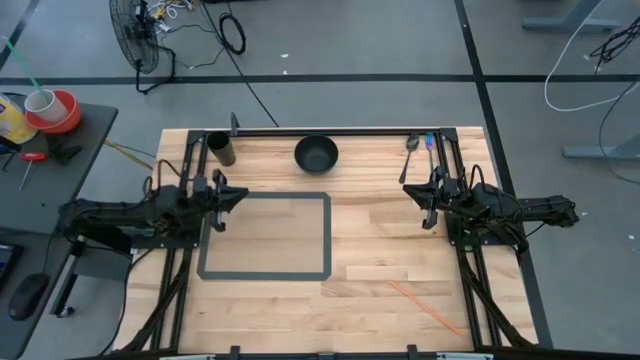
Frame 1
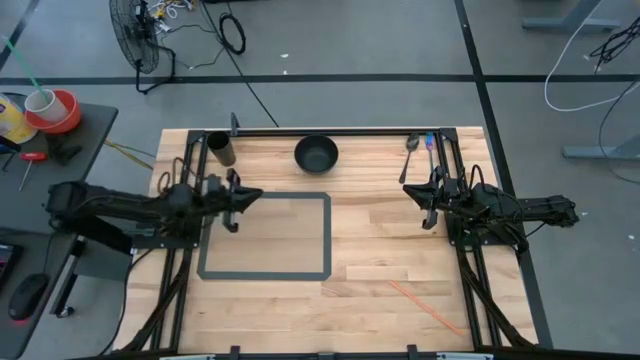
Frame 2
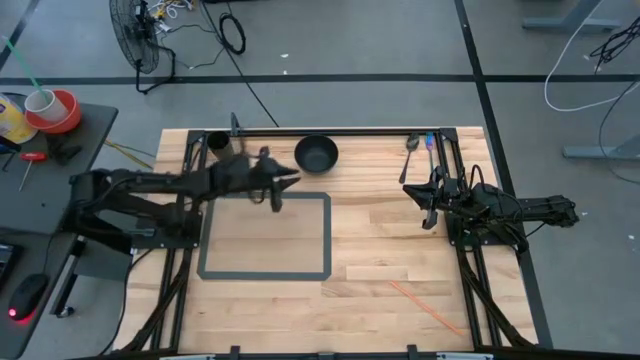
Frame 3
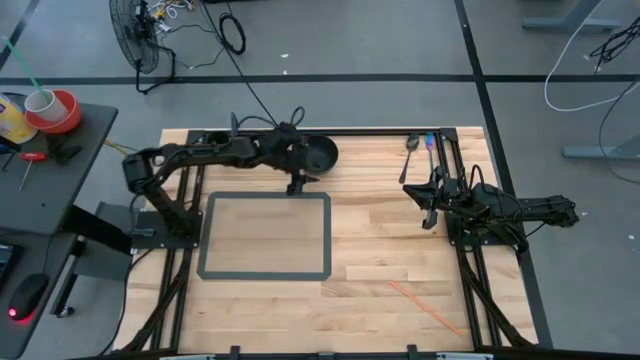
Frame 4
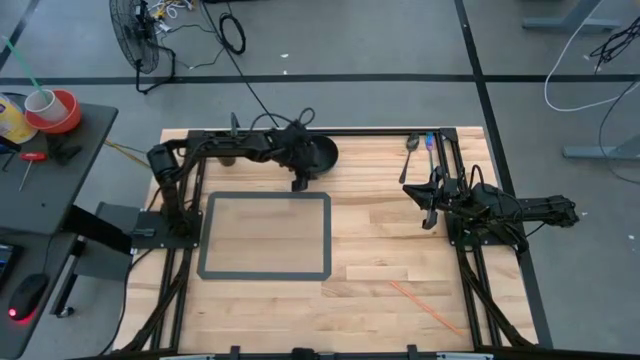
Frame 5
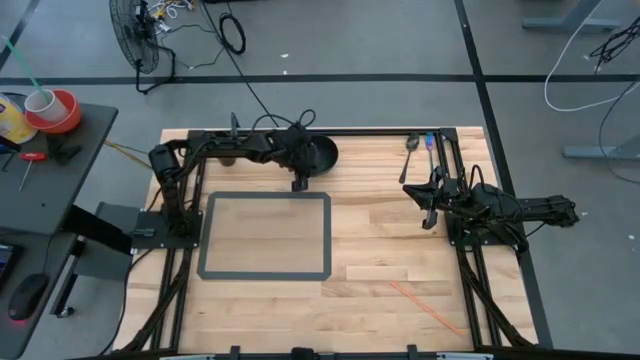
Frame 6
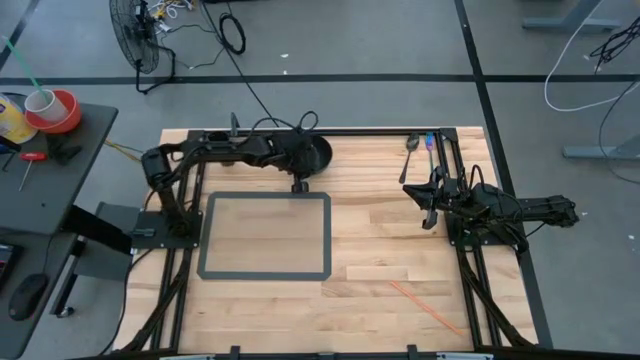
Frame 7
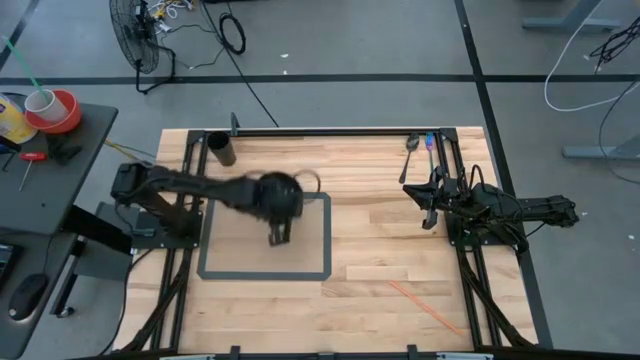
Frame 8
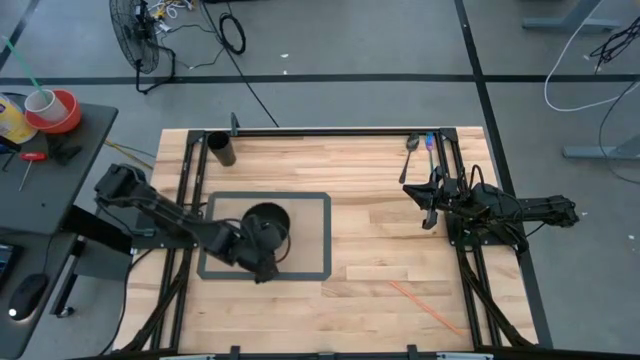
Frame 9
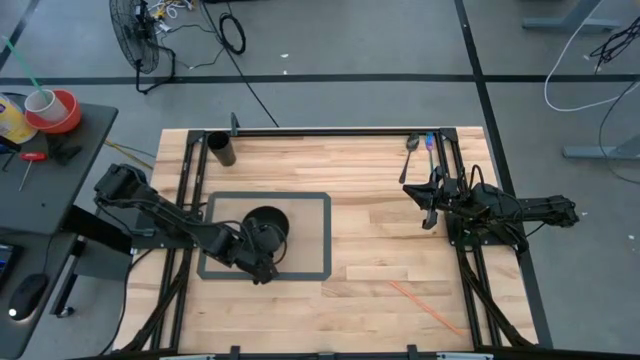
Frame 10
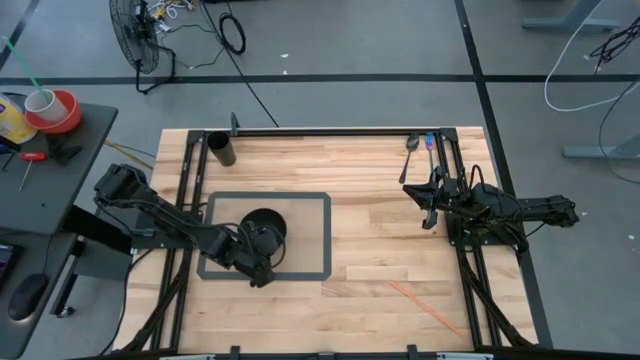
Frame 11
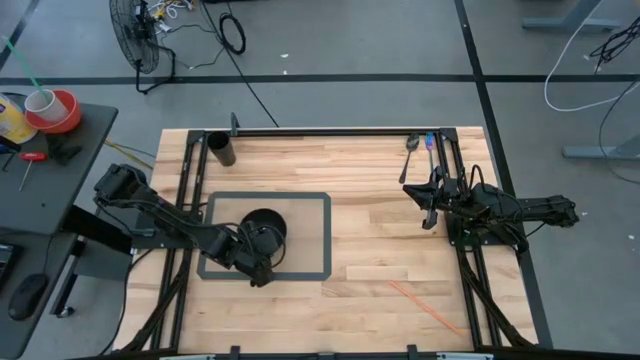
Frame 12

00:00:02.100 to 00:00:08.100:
Task: Pick & Place Utensil
Put the black bowl on the center of the transparent mat

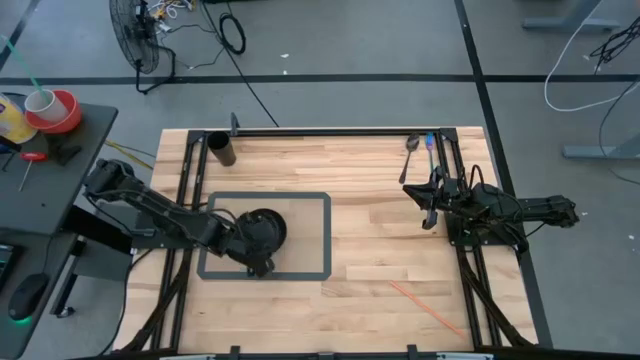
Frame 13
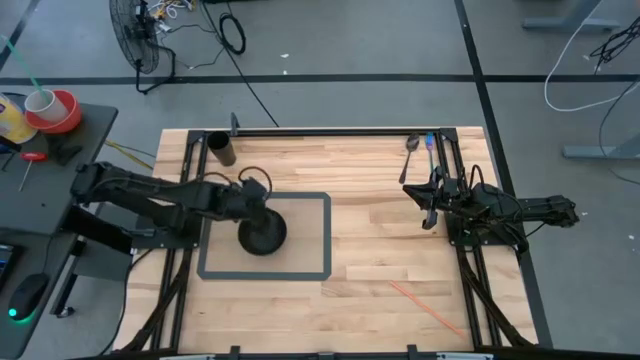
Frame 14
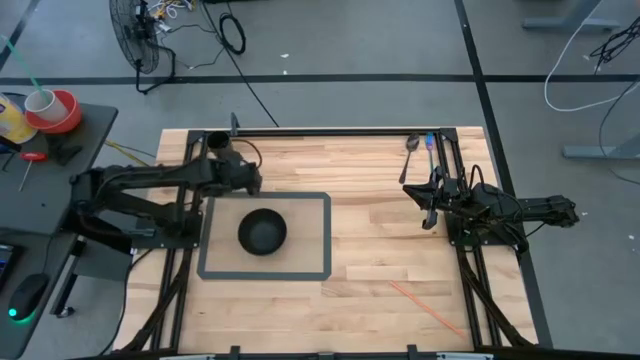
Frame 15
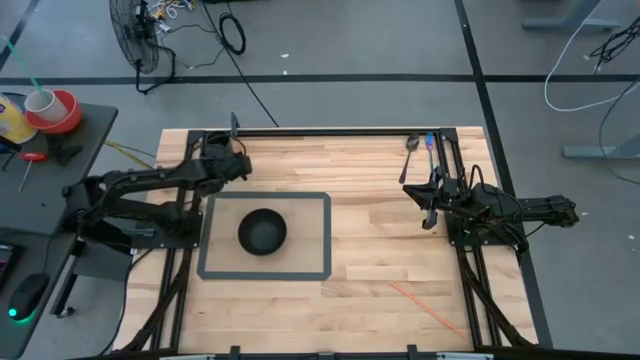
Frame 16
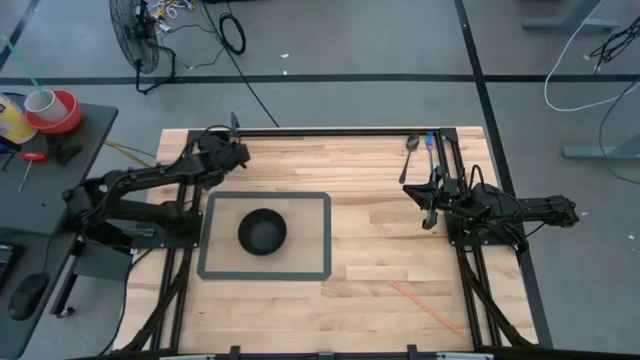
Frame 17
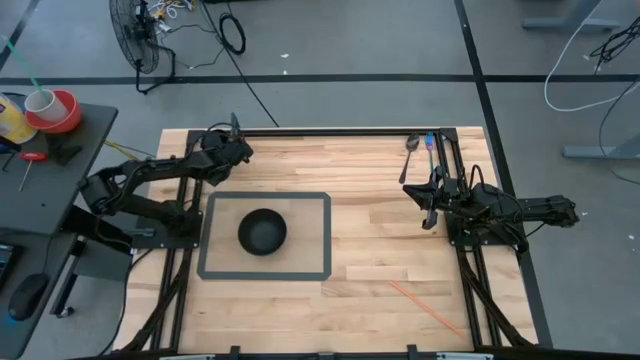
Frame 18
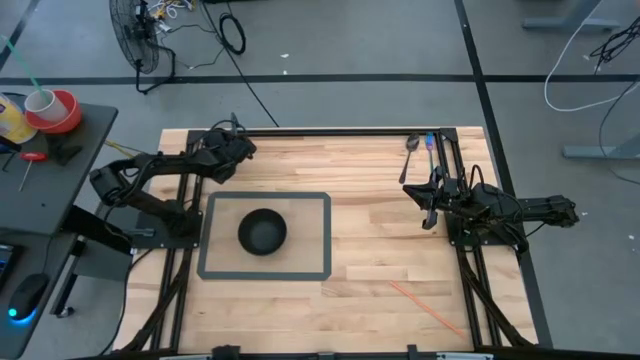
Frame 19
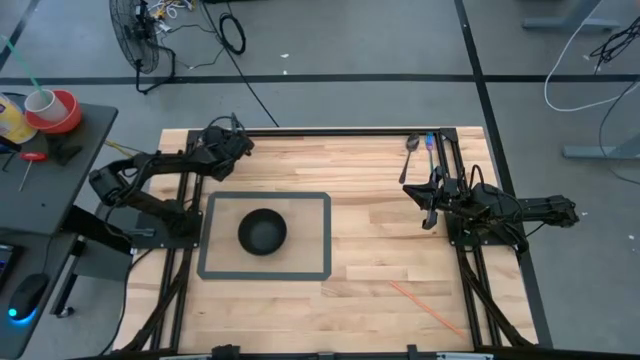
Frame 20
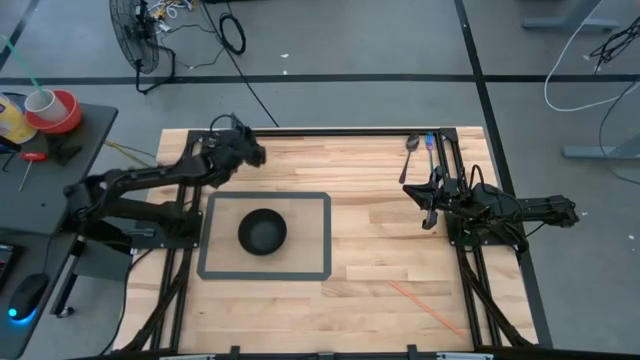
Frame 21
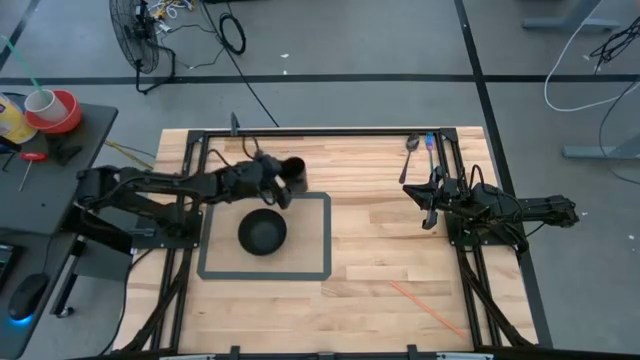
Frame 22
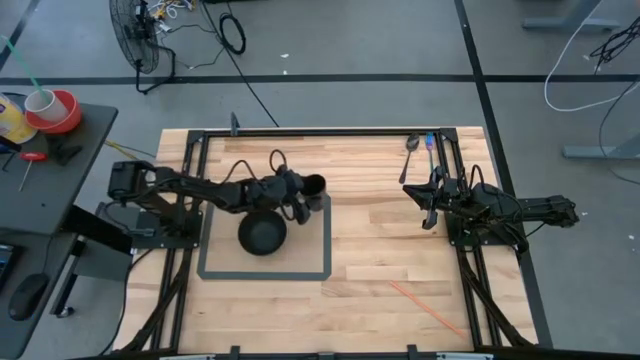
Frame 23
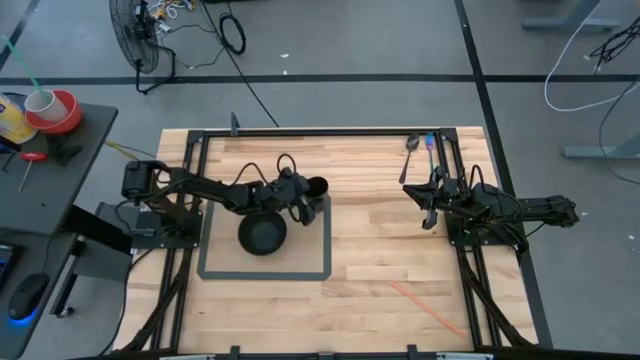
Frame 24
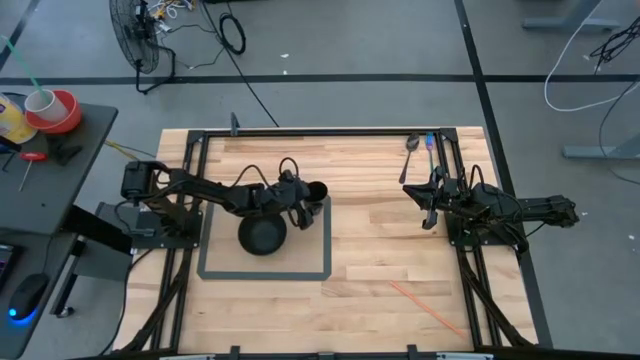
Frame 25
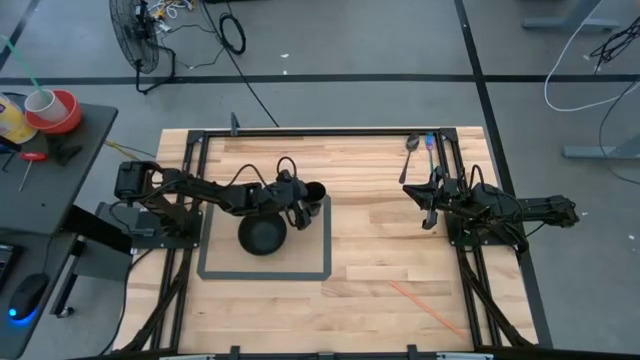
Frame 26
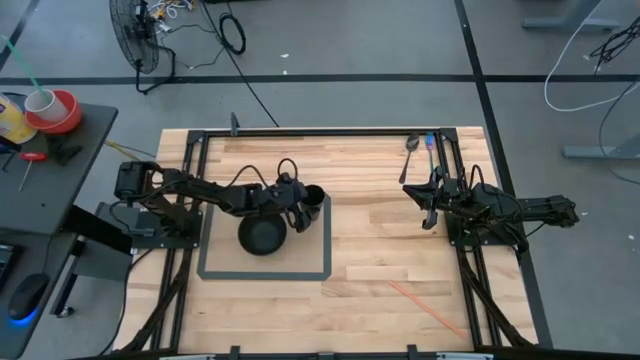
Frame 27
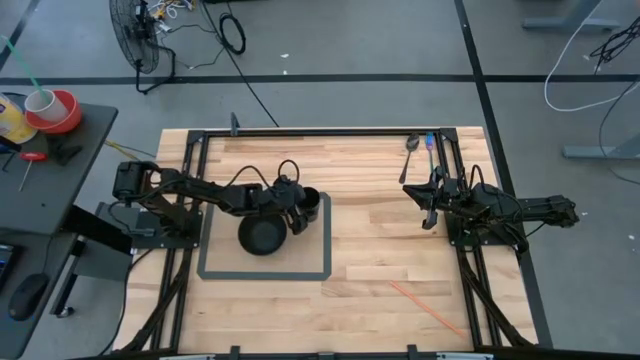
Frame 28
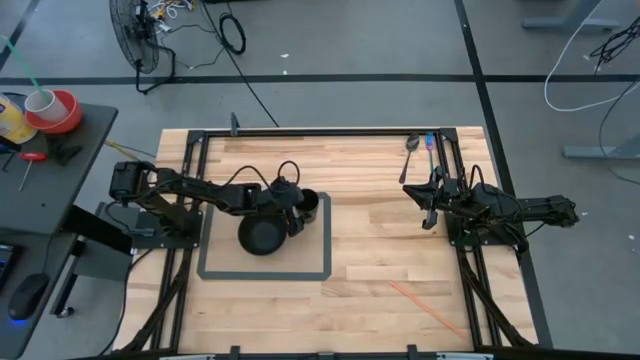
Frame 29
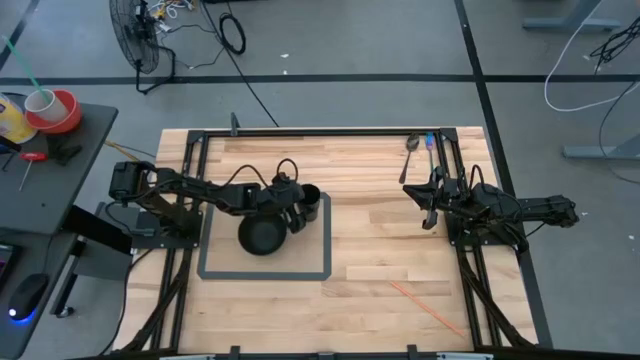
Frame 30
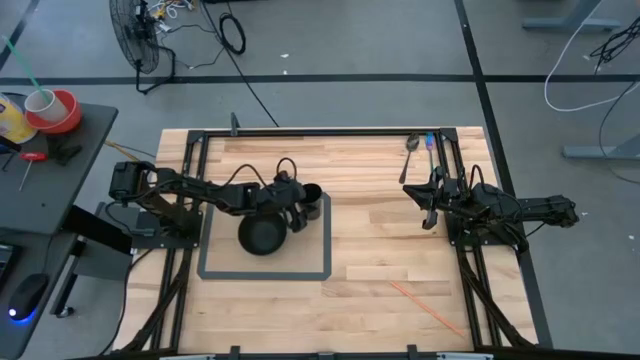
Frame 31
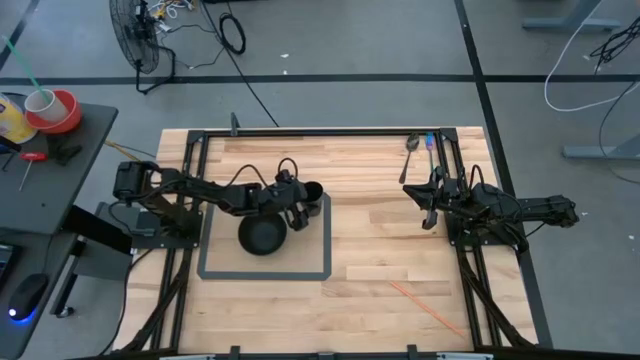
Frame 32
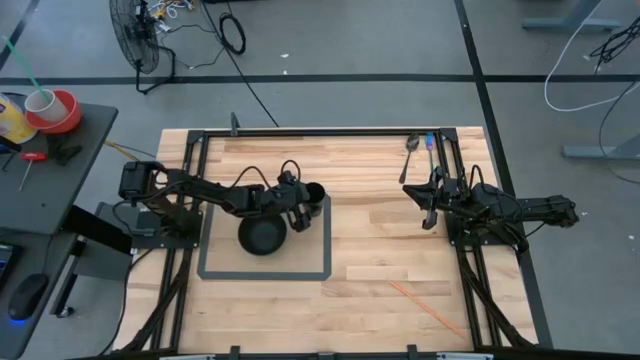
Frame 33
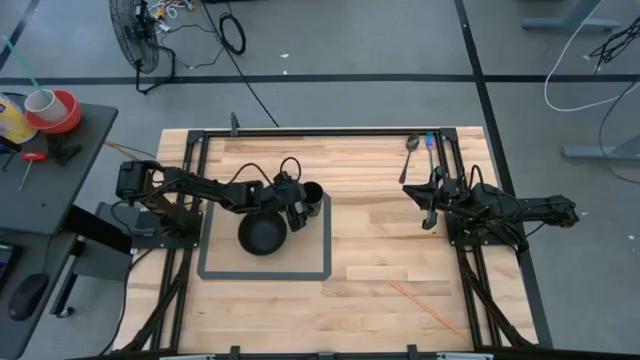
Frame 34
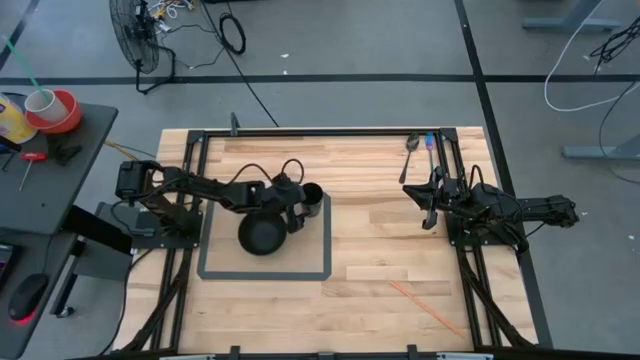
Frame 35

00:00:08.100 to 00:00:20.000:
Put the black cup on the top right of the transparent mat

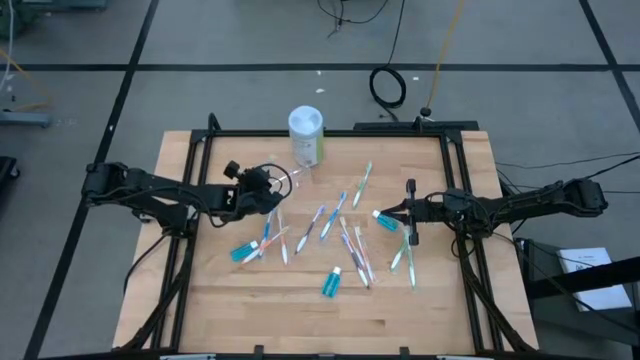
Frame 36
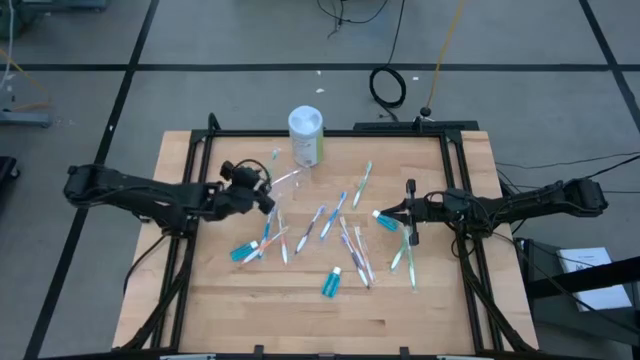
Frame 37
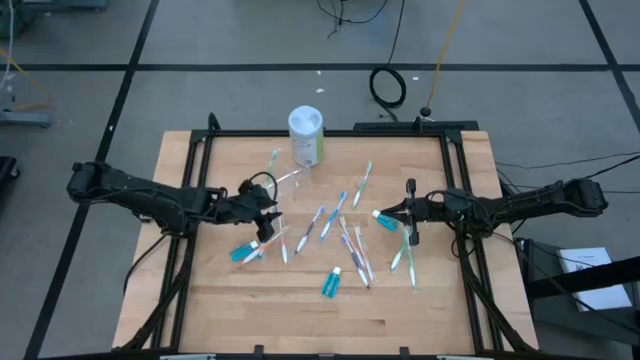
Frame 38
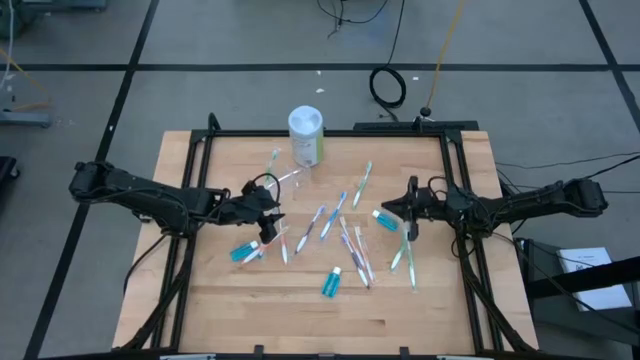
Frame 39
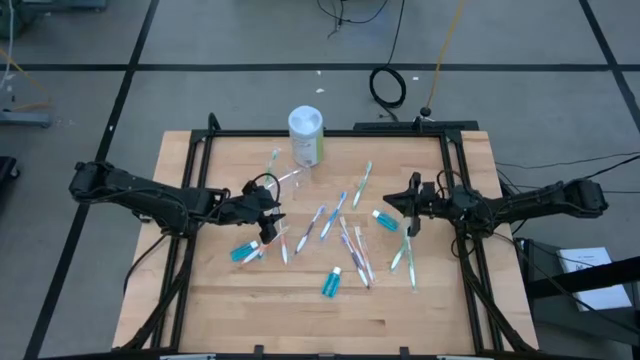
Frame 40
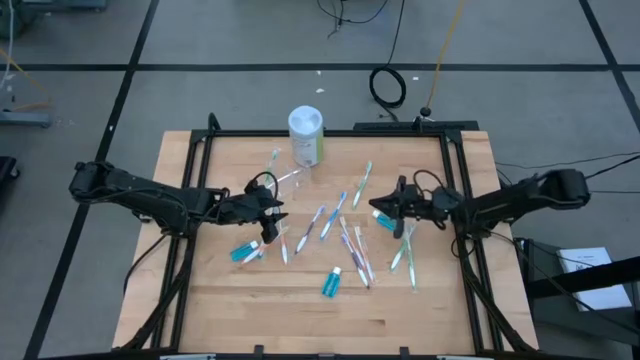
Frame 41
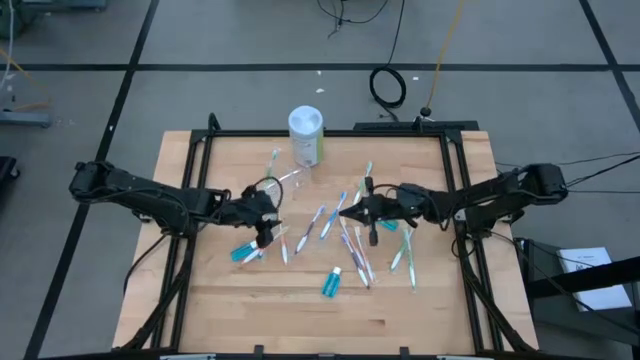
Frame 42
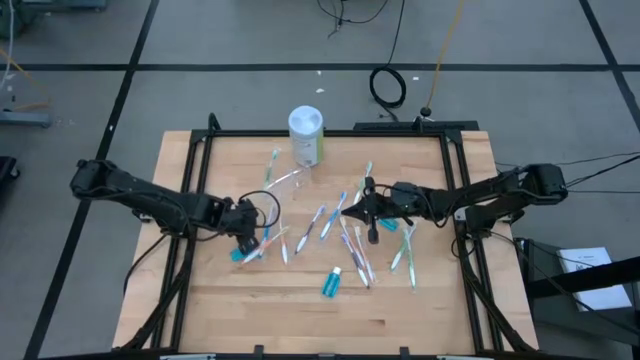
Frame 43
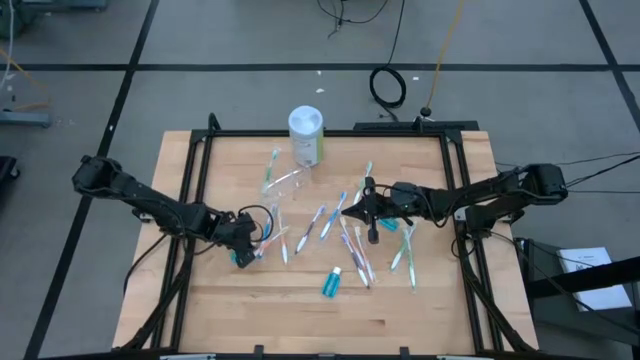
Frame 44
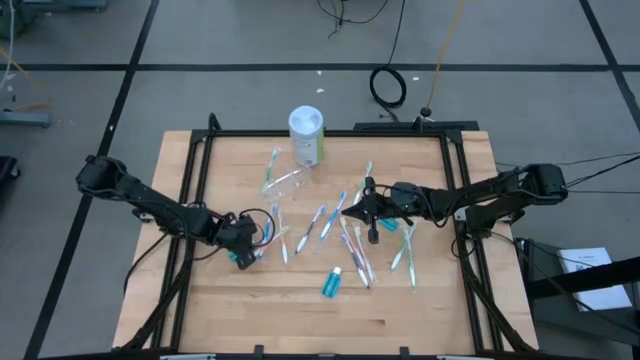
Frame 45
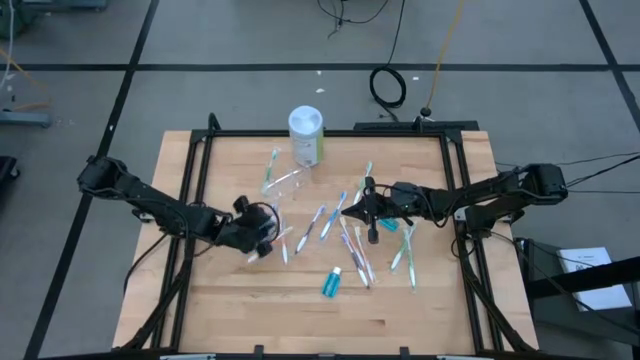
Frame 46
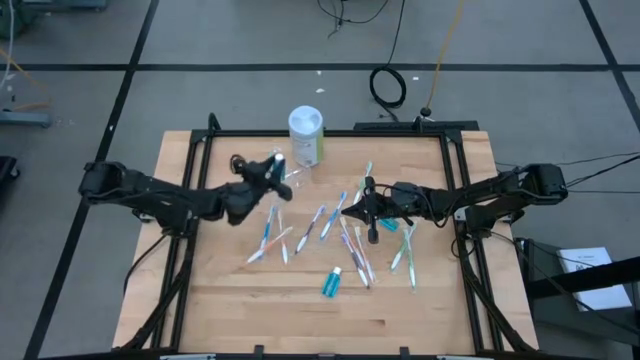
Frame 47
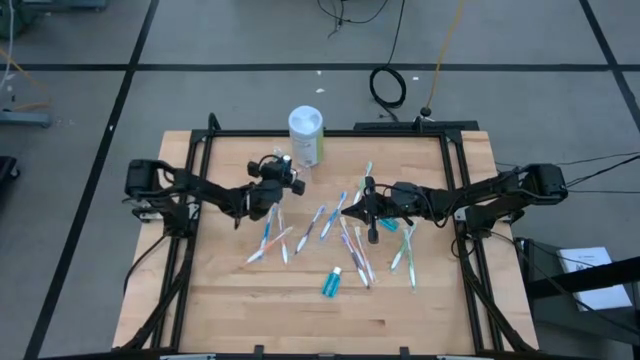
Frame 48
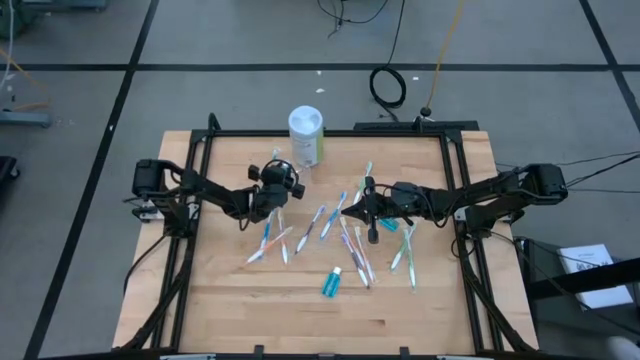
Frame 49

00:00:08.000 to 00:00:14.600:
Task: Pick & Place toothbrushing station
Put the middle blue mouthwash into the transparent organizer
